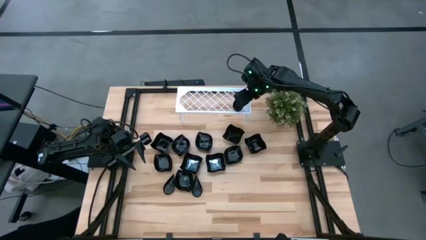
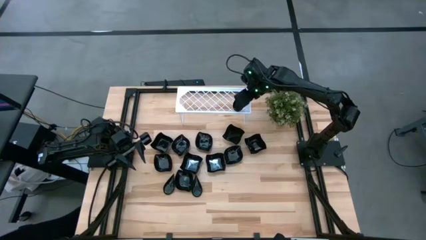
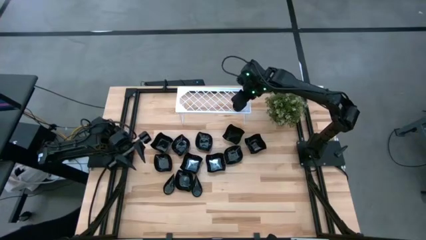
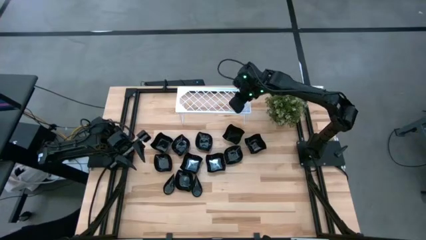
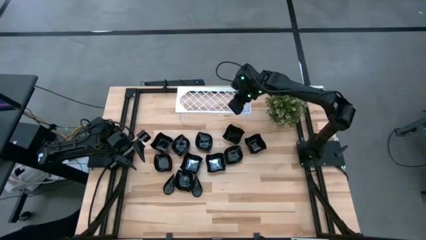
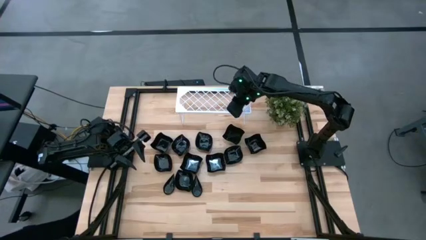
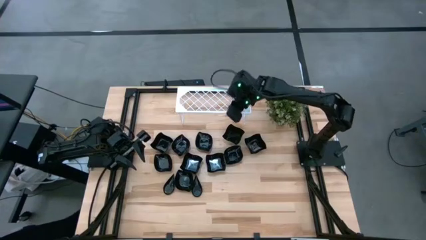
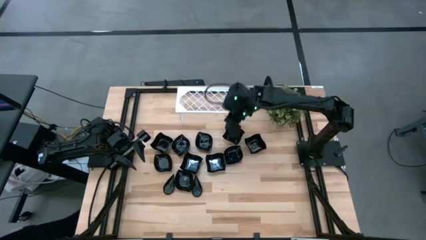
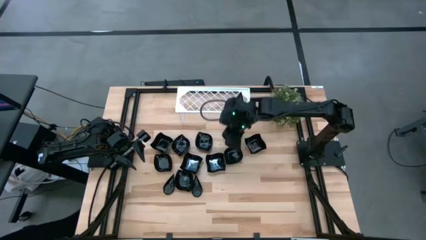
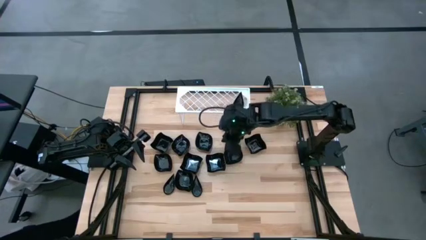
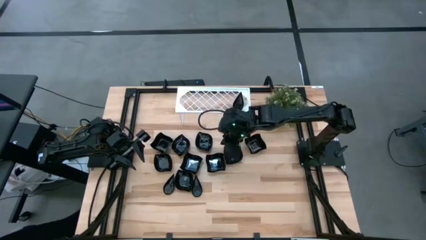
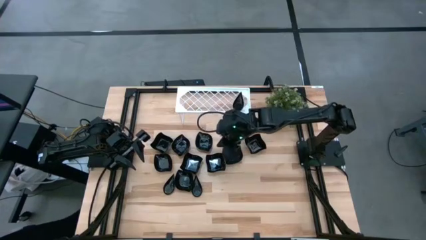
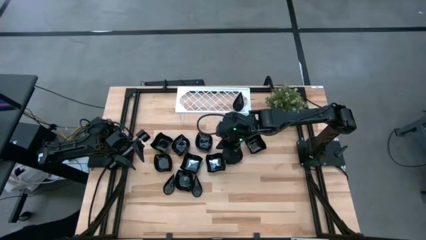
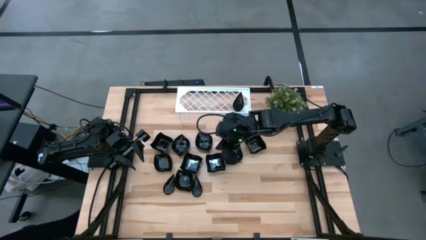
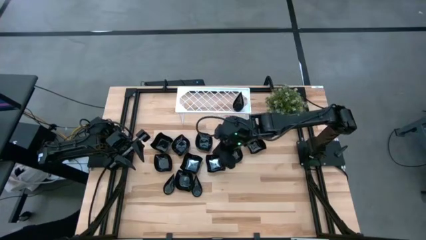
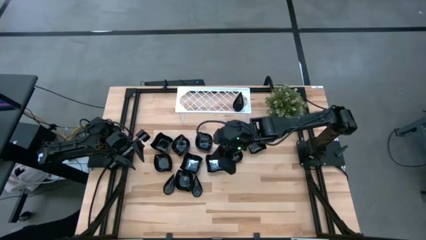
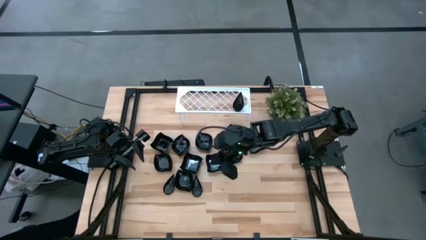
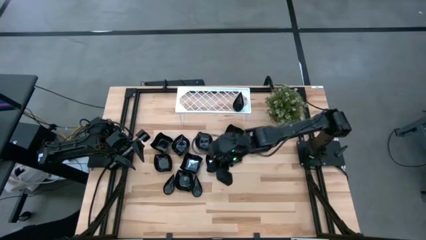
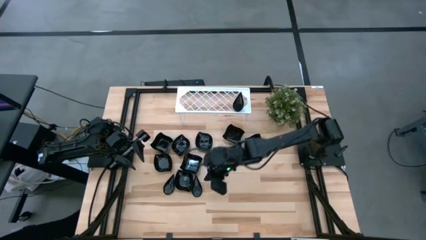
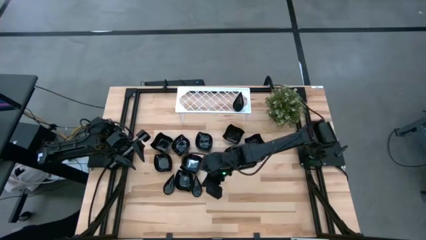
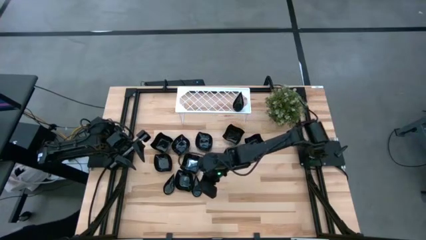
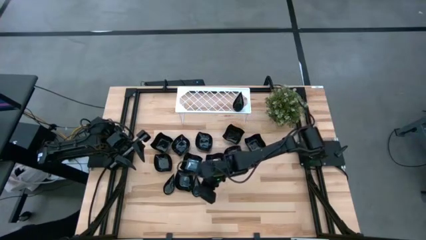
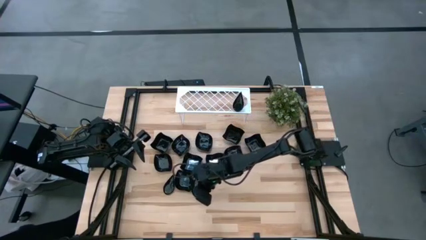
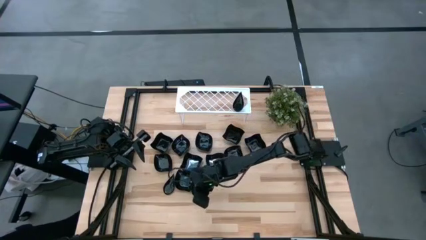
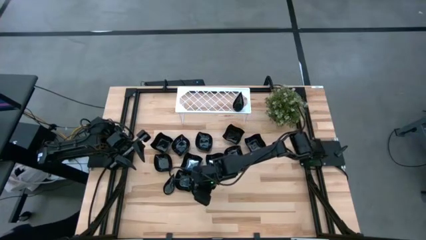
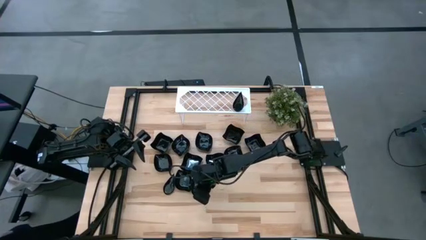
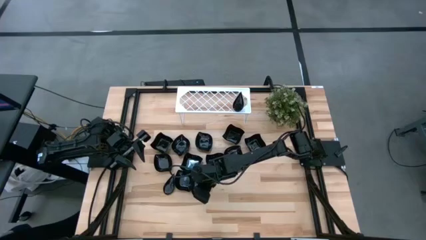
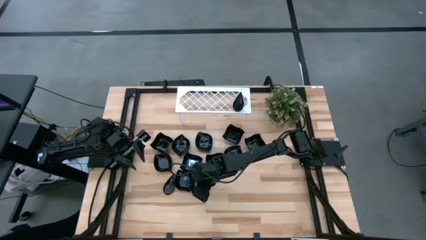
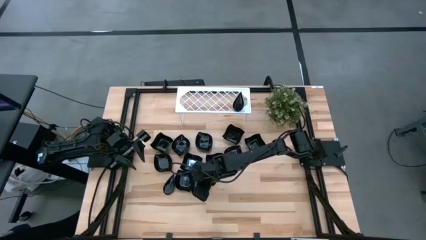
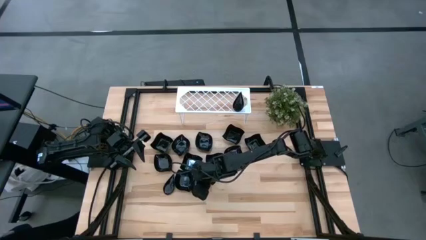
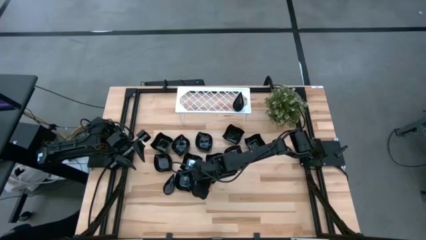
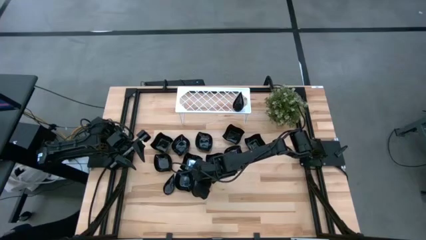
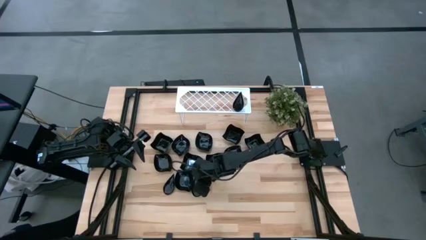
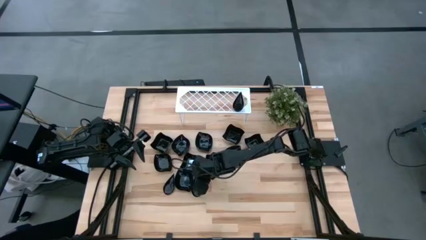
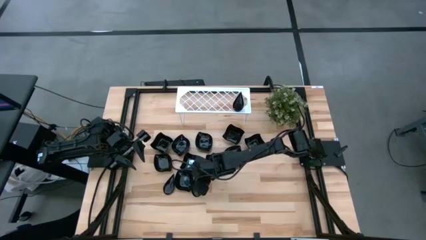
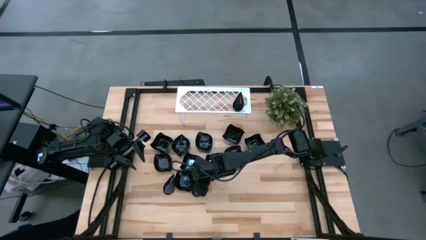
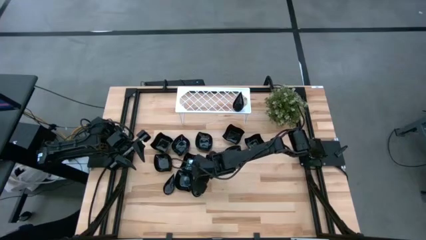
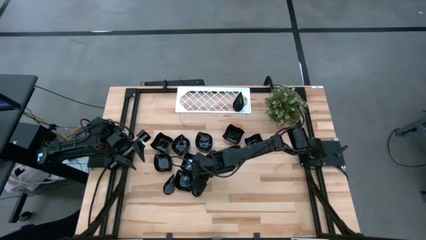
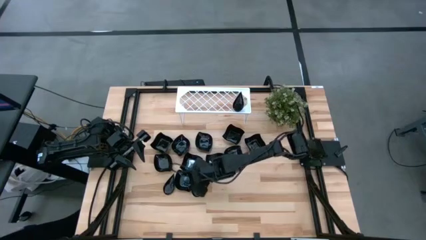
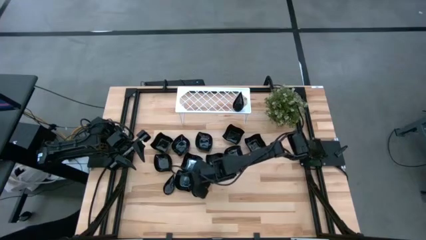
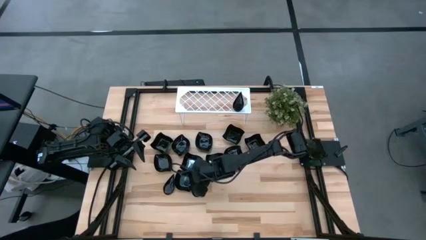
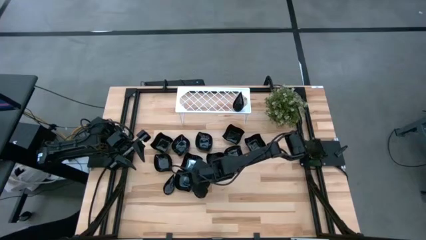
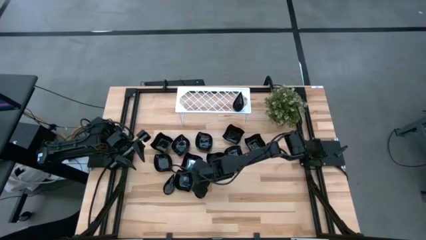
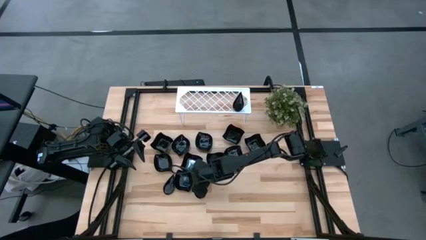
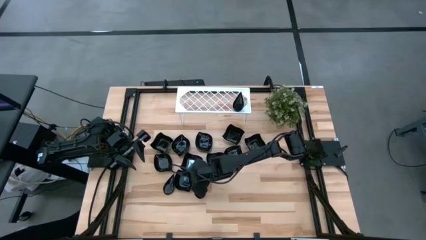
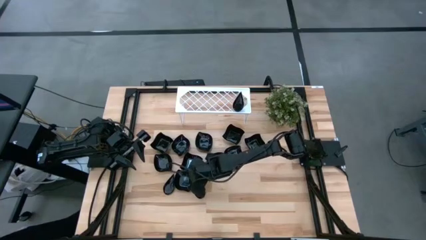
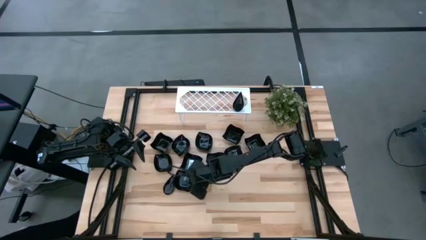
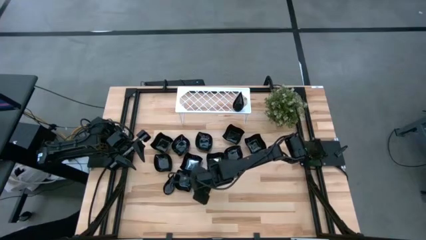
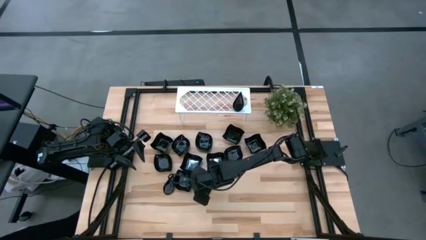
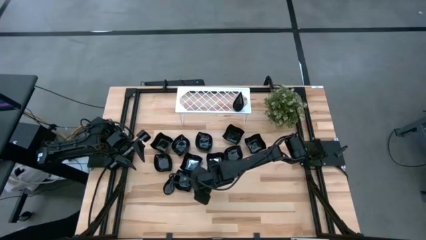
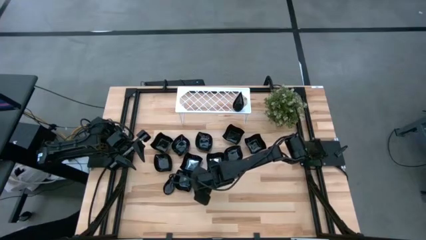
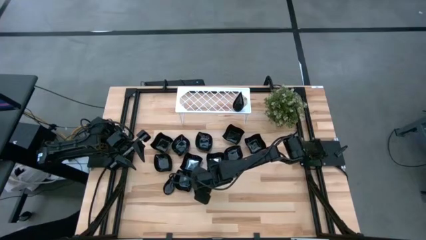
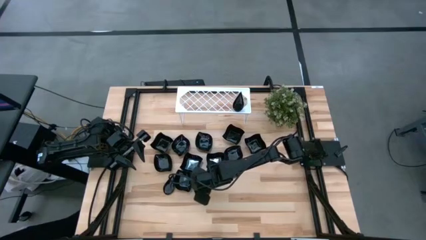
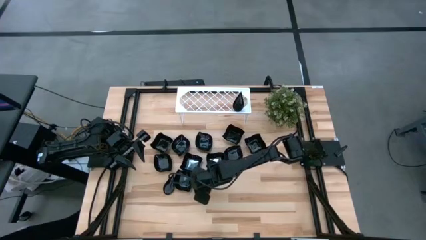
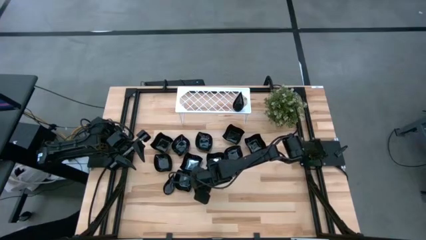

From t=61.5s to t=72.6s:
Task: Pick & Place Mini shaped plates
Stack the drop-shaped plate on top of the drop-shaped plate on the shelf

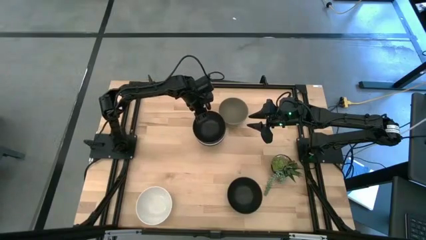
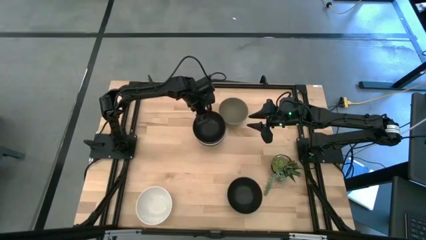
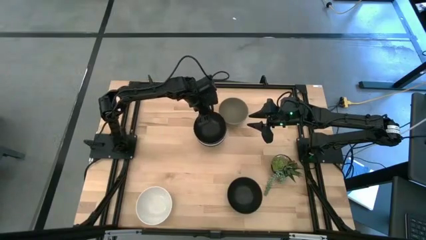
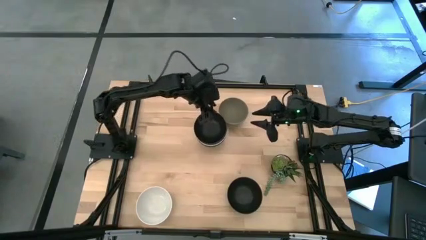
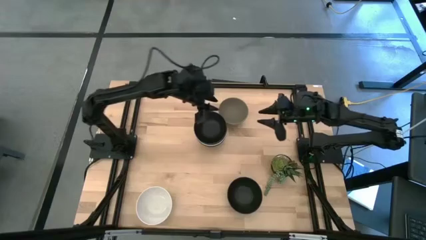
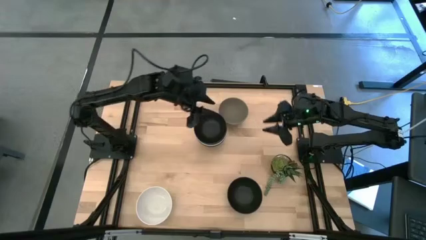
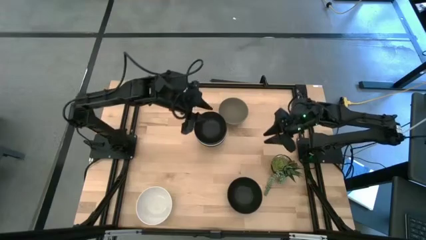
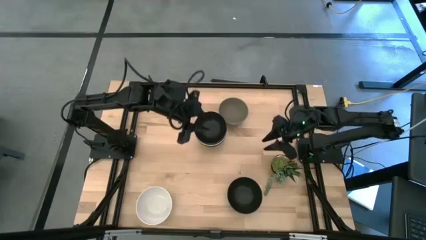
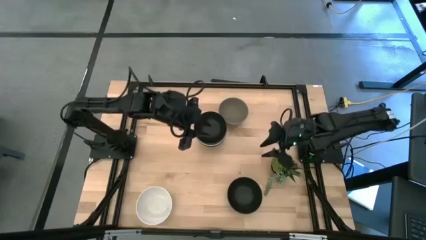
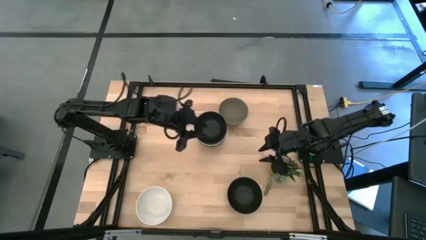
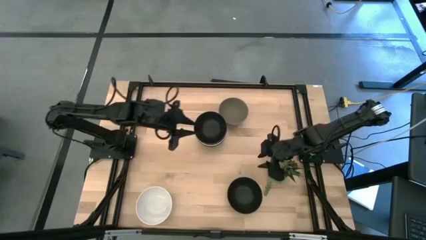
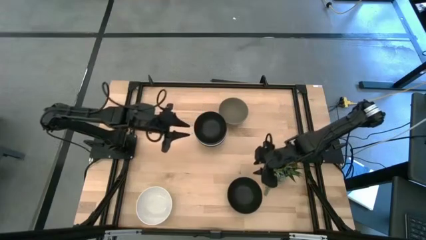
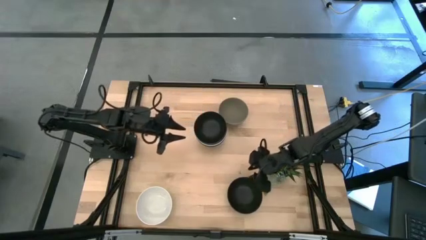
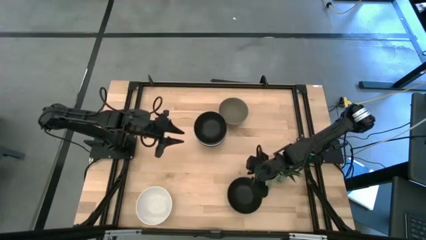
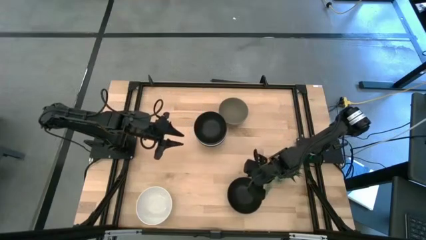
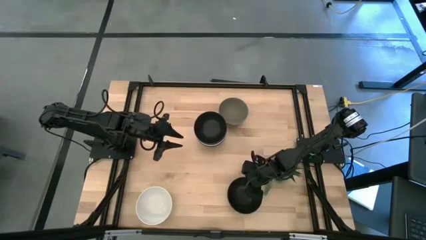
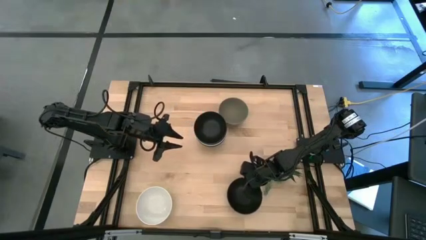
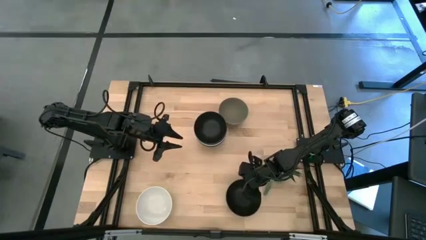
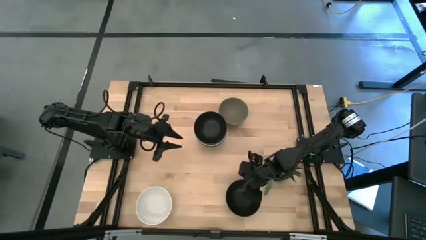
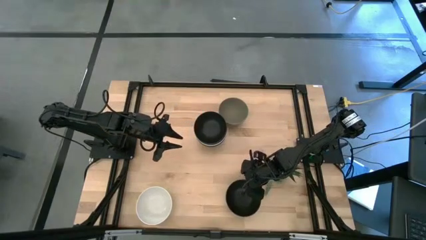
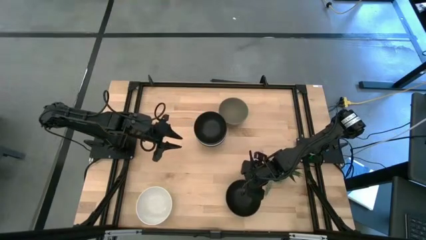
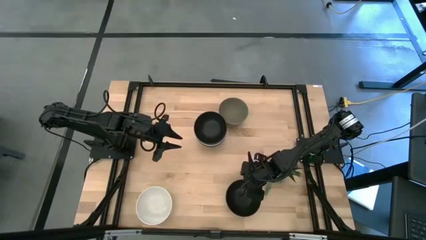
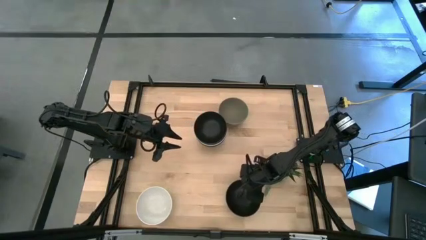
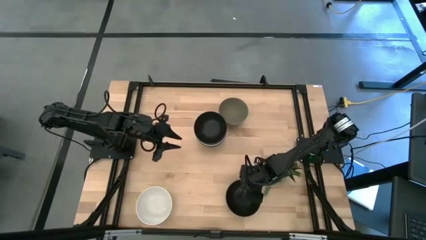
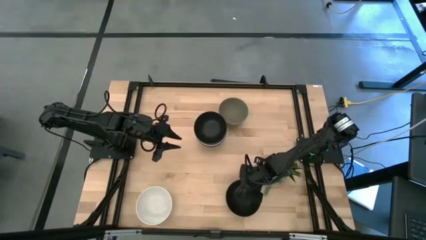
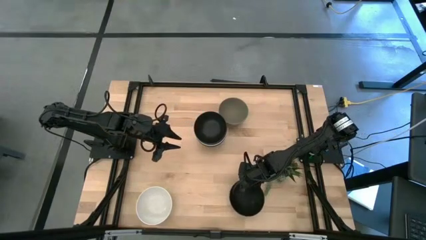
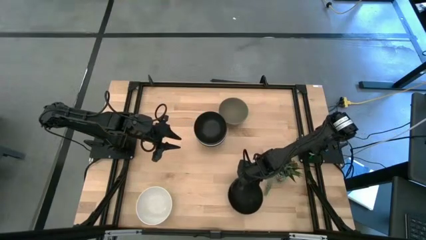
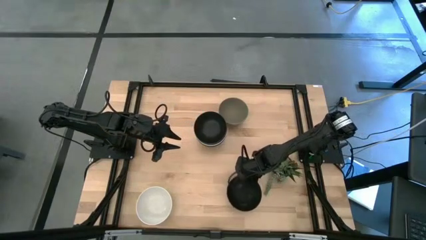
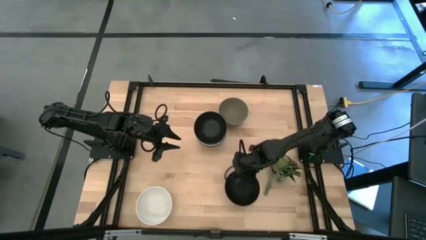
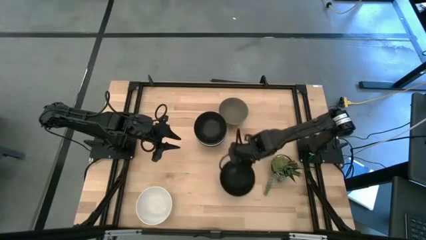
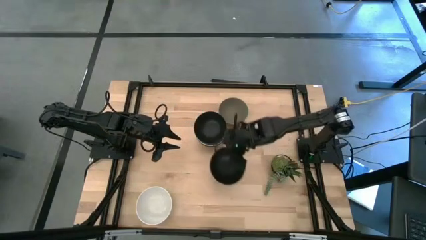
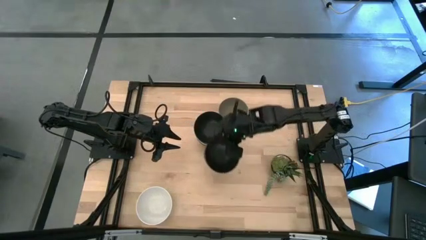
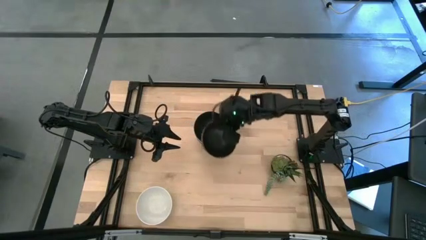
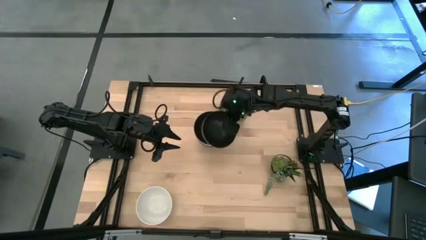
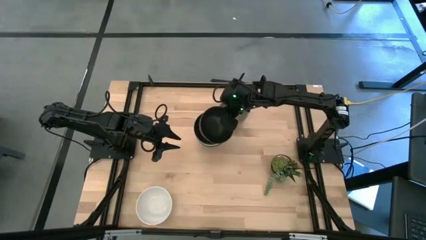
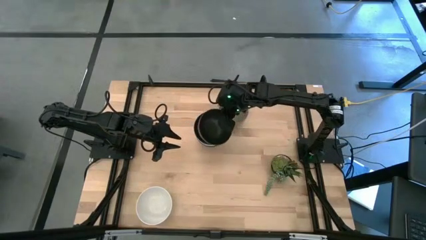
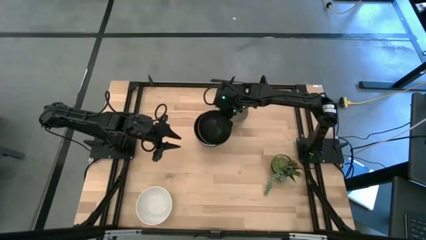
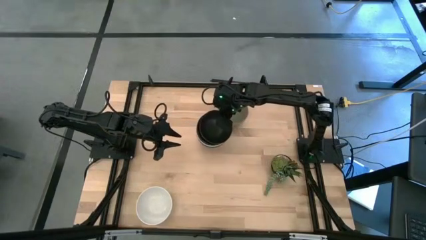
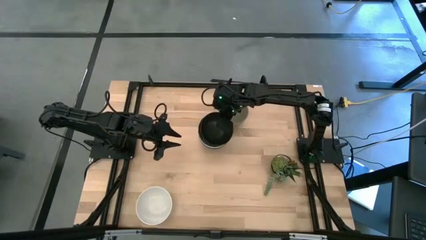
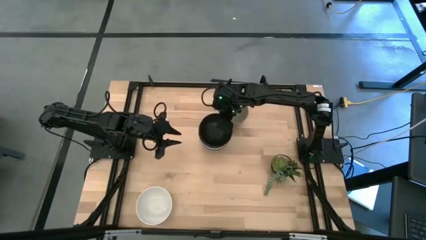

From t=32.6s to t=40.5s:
Task: Nest bowls inside each other
Stack the black bowl on the black bowl
